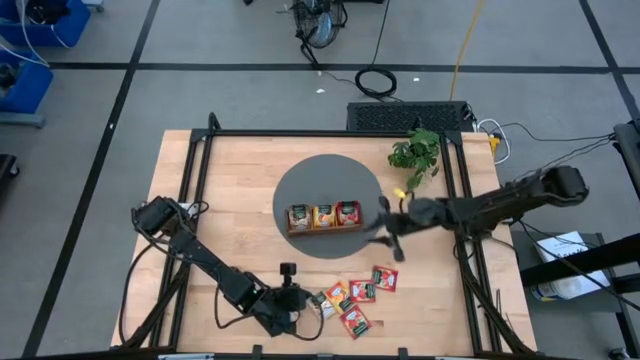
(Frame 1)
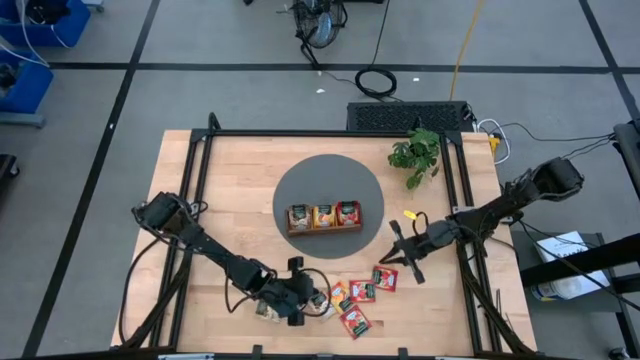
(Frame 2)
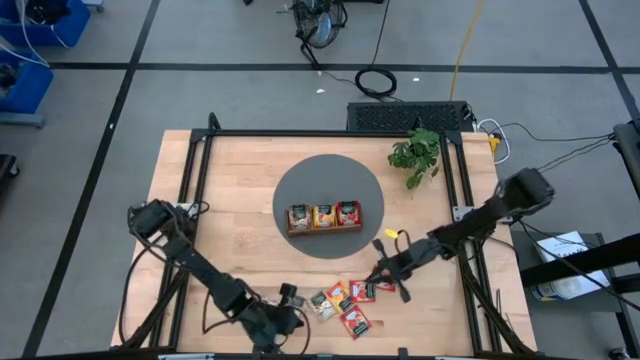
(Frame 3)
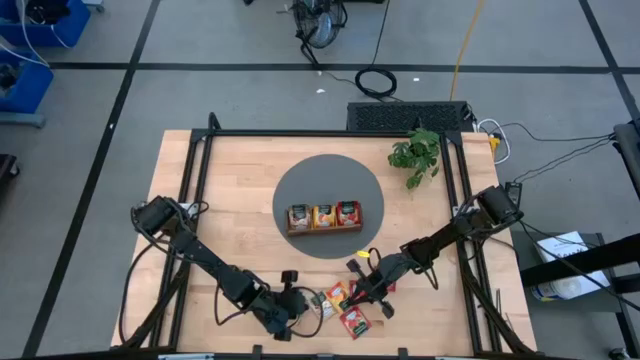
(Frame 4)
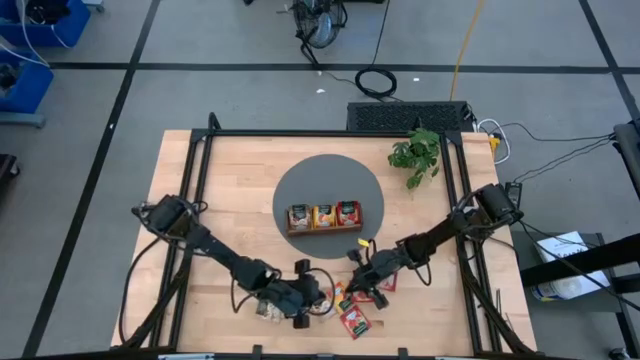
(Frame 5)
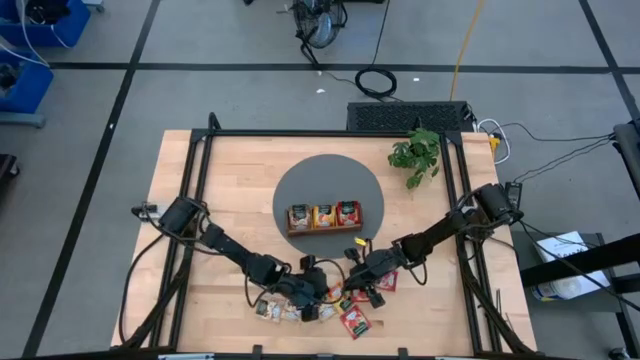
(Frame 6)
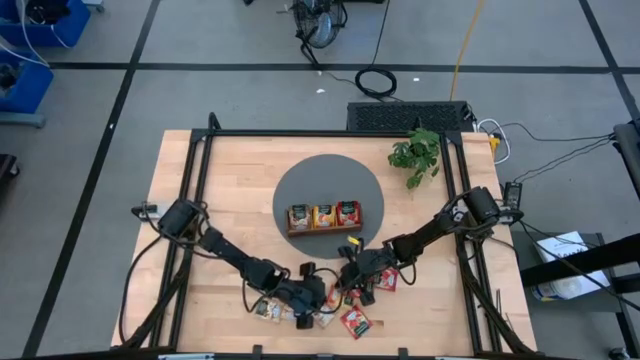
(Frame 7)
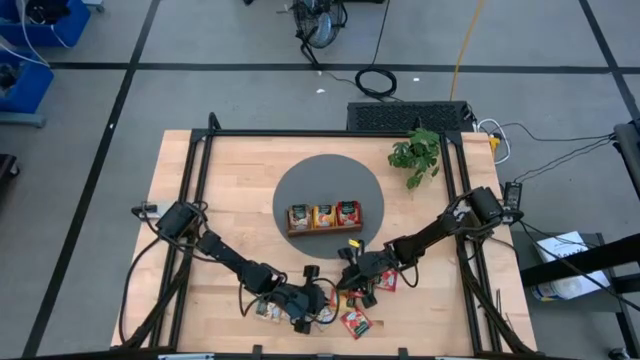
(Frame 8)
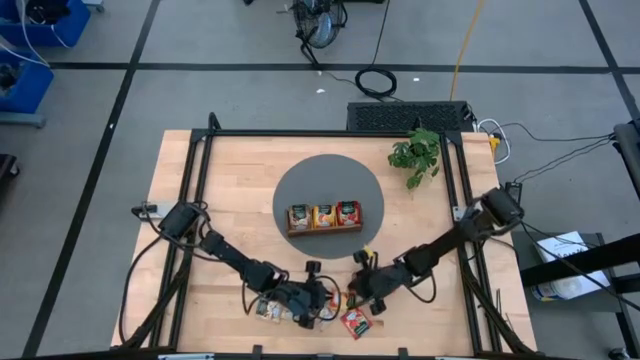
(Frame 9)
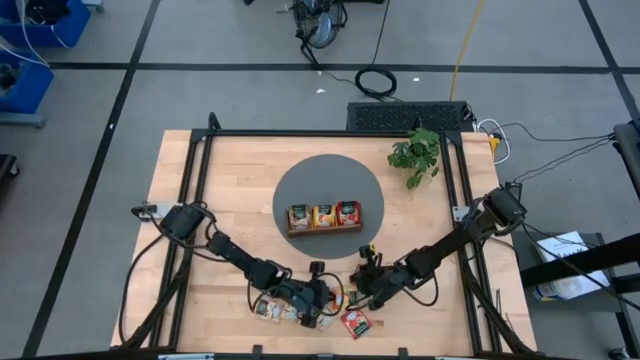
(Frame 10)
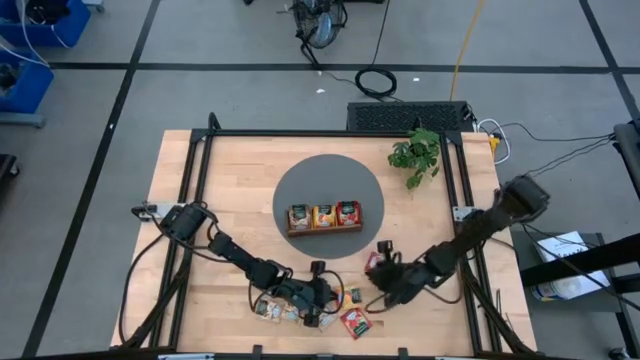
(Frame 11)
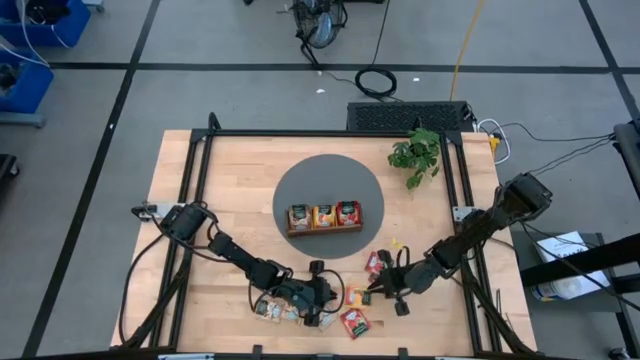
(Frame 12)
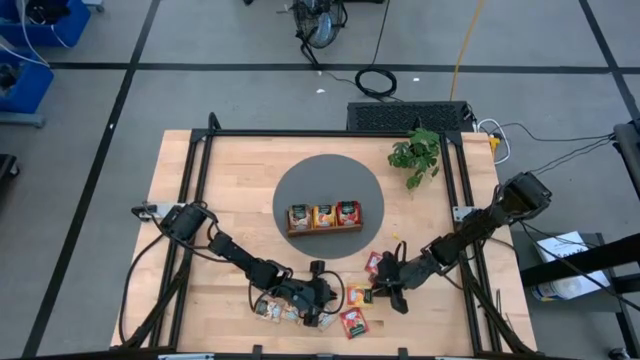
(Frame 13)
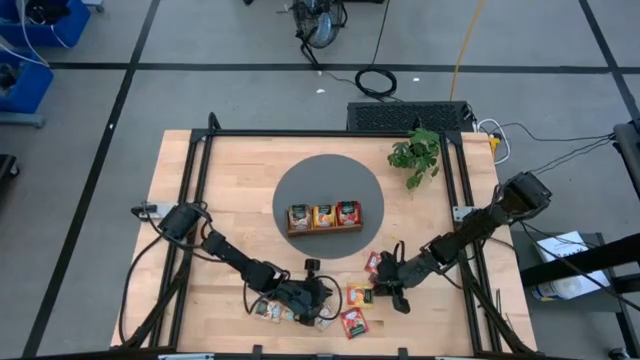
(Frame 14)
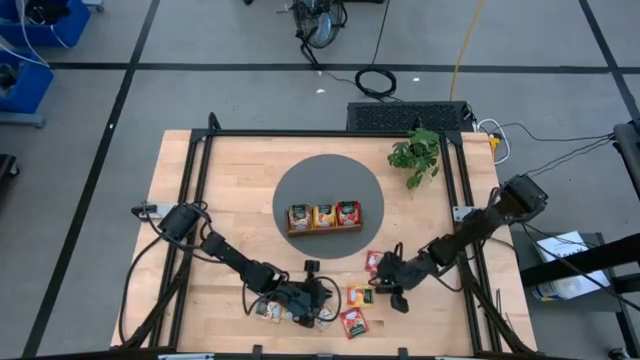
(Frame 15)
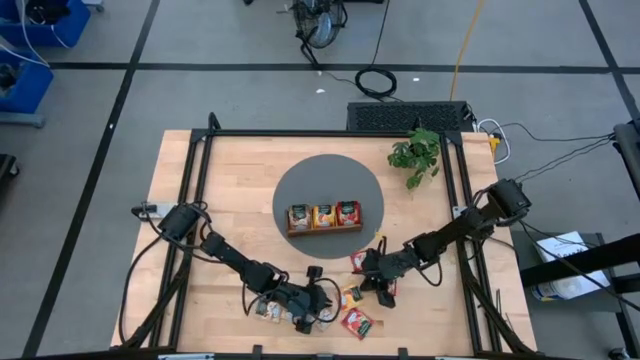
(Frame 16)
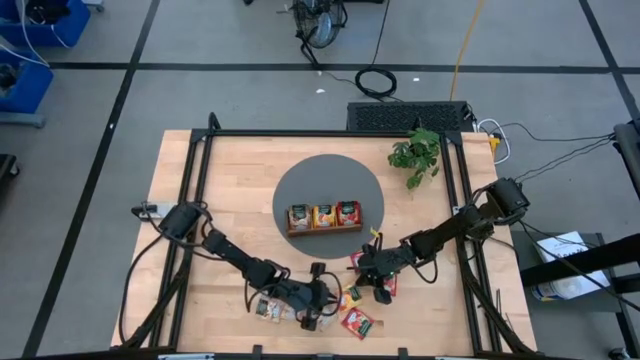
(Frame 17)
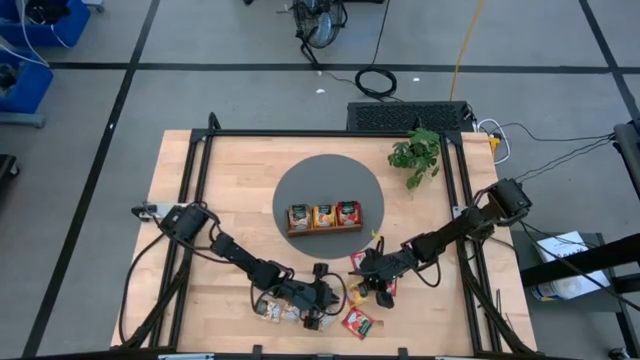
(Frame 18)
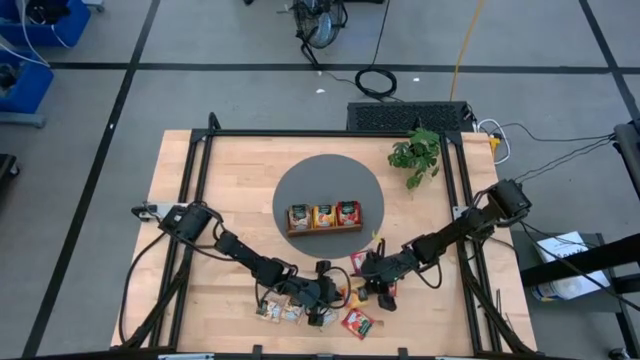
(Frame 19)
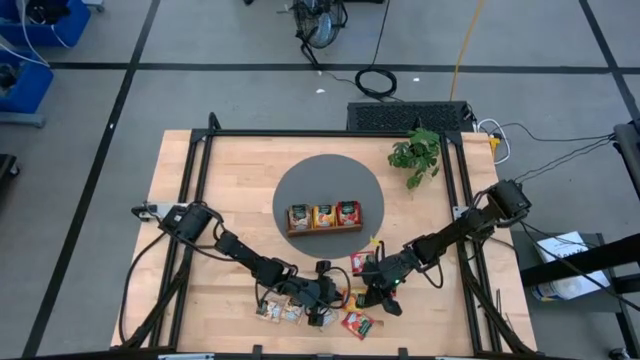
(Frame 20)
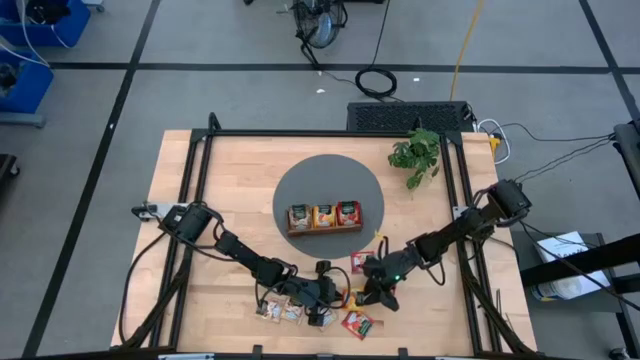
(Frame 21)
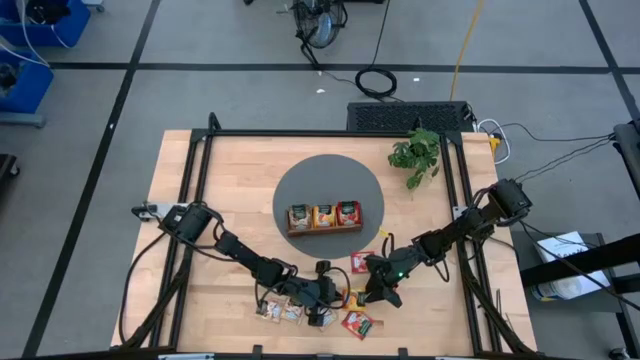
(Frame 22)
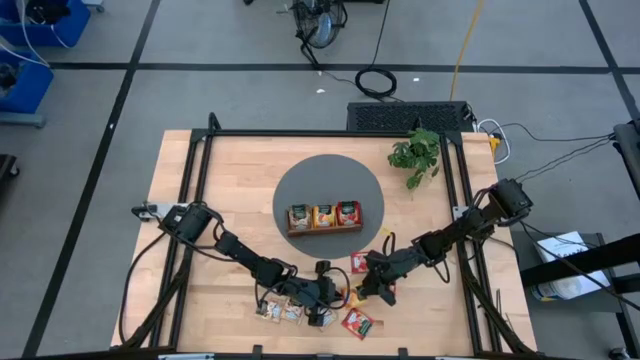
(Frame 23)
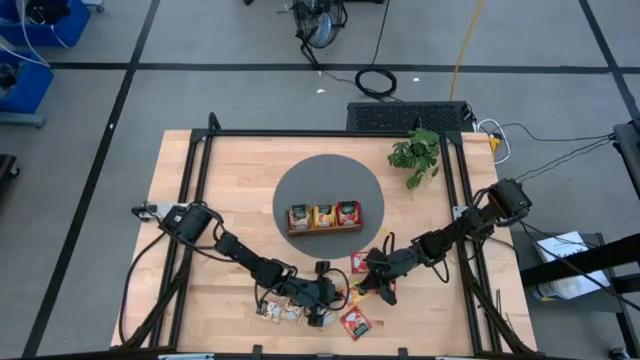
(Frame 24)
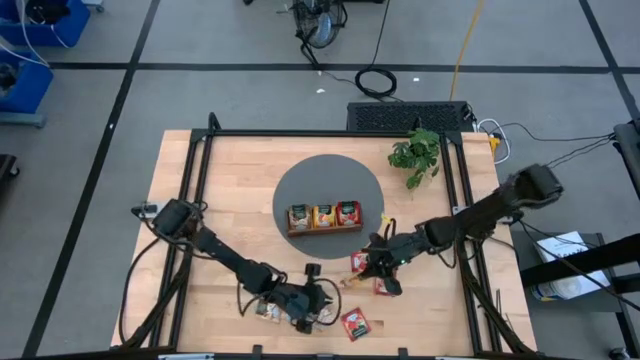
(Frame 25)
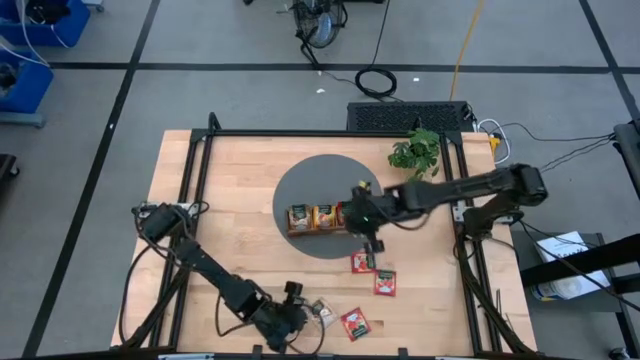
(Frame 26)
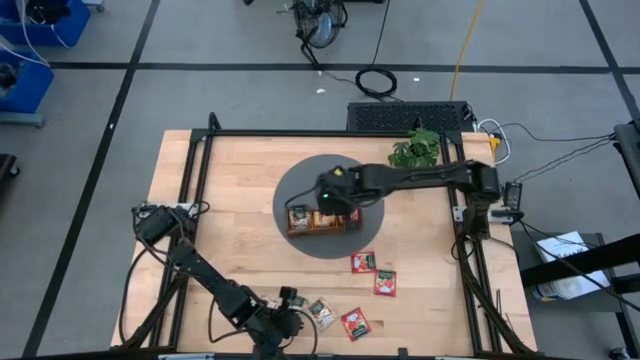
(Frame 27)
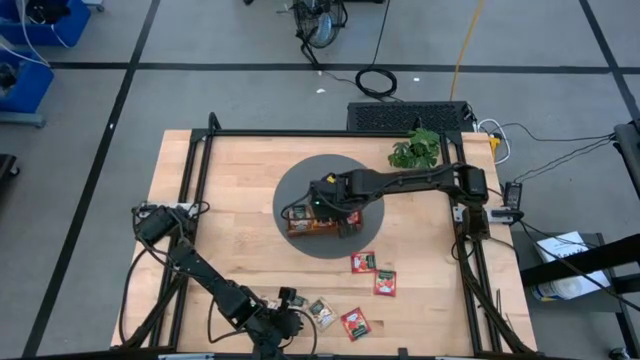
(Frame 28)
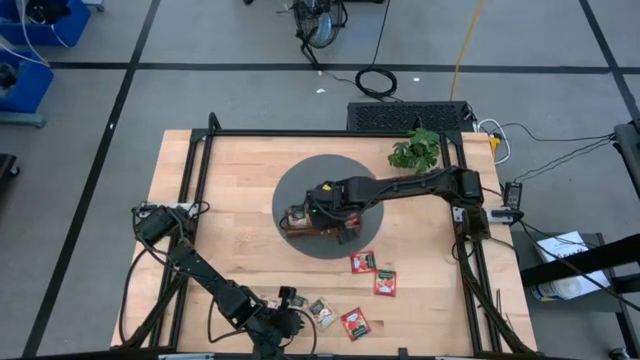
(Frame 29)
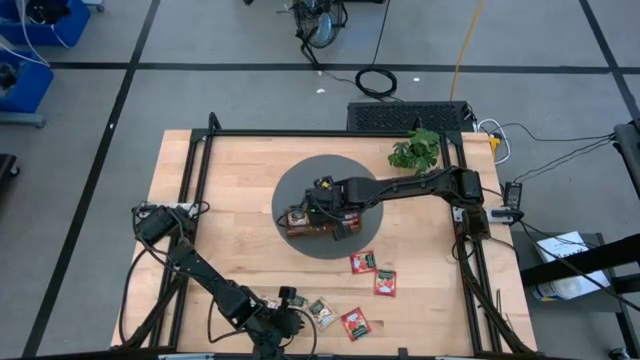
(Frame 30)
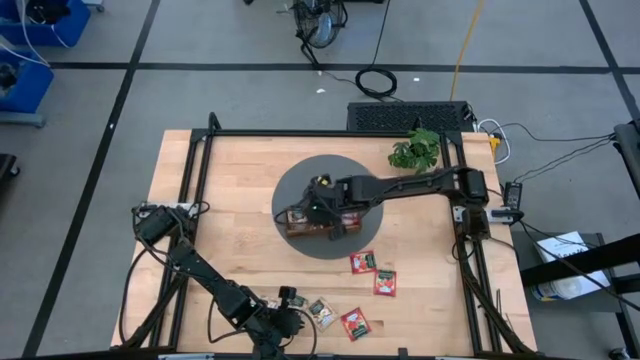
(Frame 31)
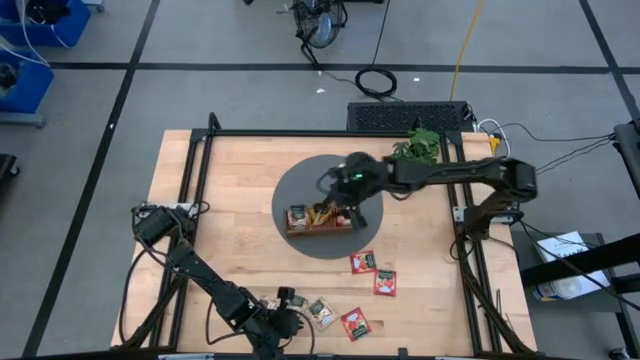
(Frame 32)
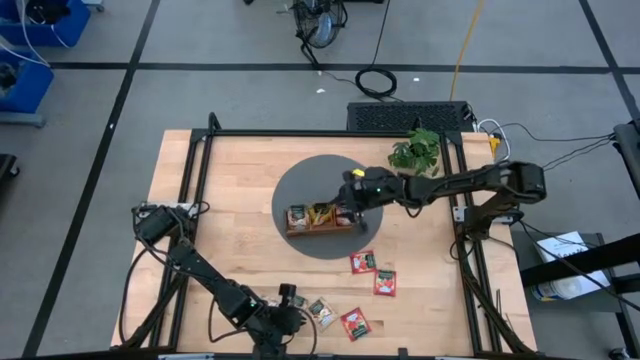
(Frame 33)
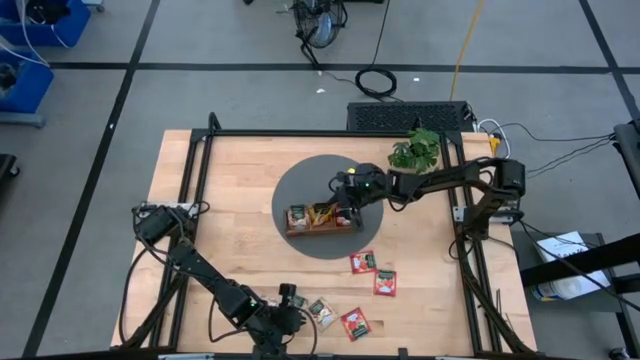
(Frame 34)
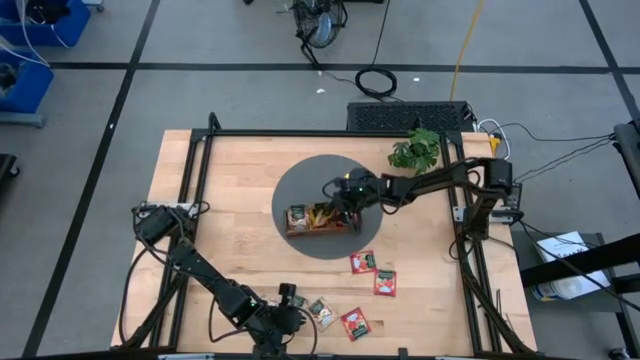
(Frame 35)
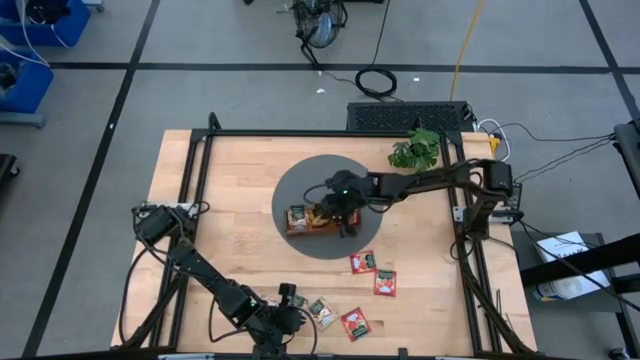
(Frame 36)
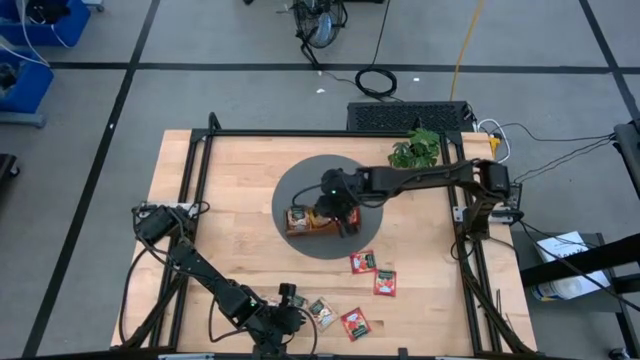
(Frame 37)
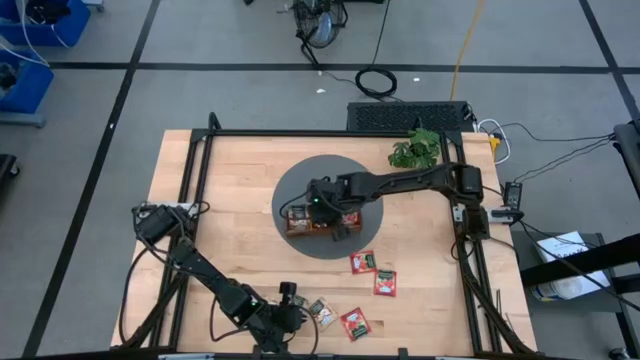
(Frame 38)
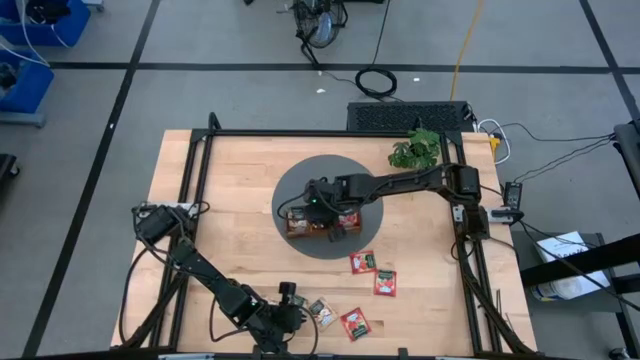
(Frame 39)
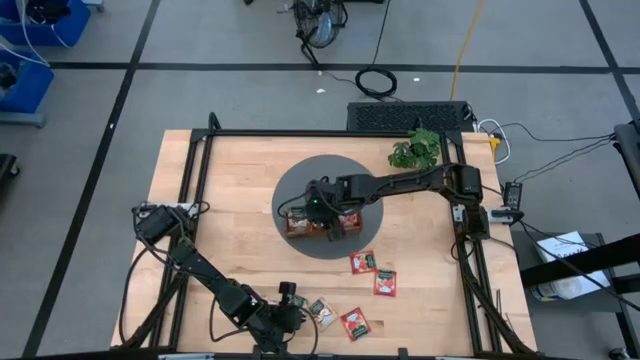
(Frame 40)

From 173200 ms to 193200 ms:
Task: Pick & Place Tea
Put the mango tea sachet into the middle compartment of the wooden organizer

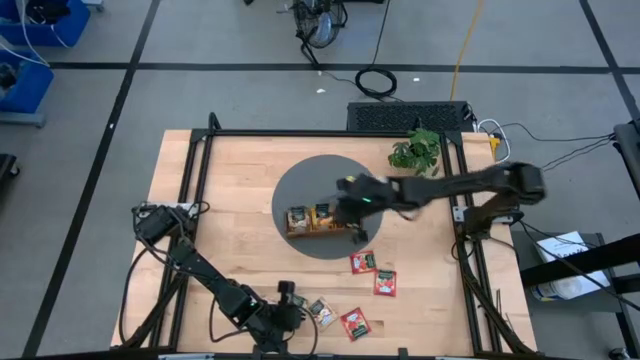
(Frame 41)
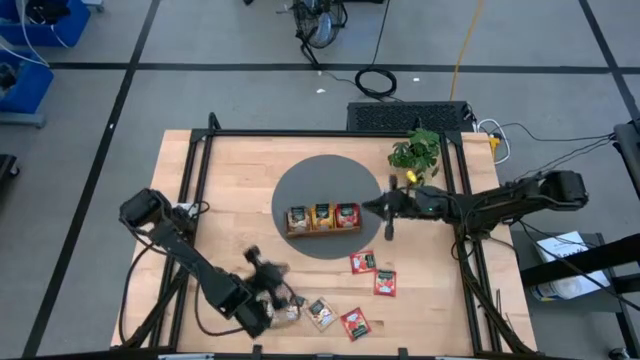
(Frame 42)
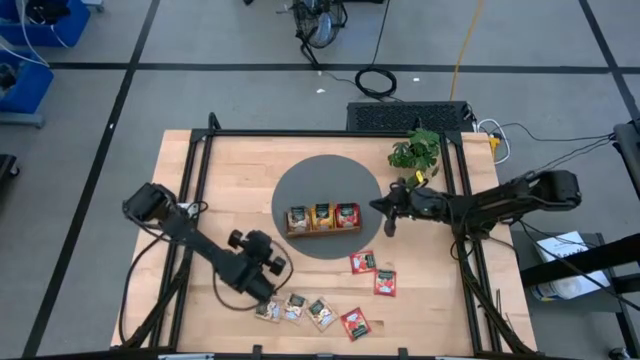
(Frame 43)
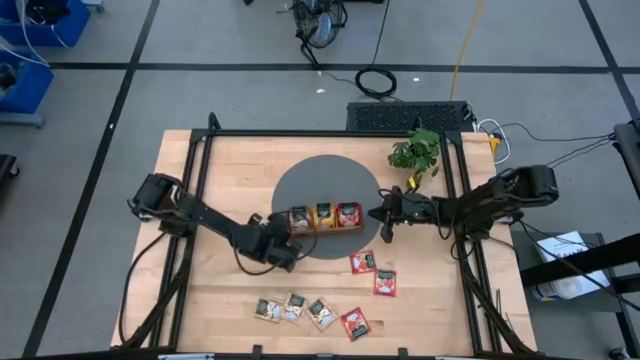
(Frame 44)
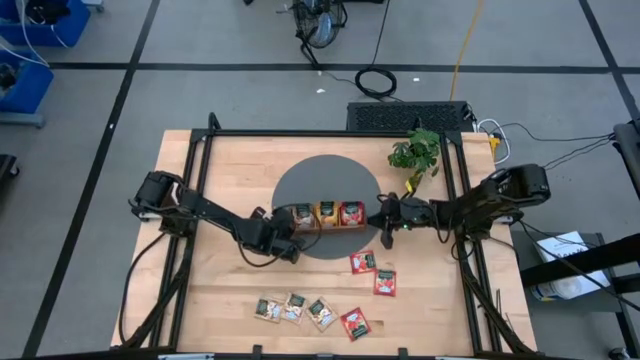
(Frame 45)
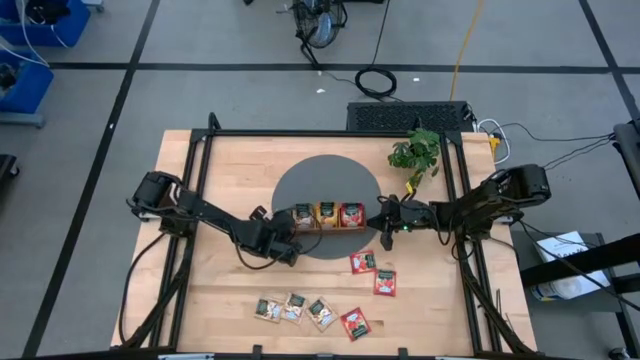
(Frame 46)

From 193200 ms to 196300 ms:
Adjust the wooden organizer
